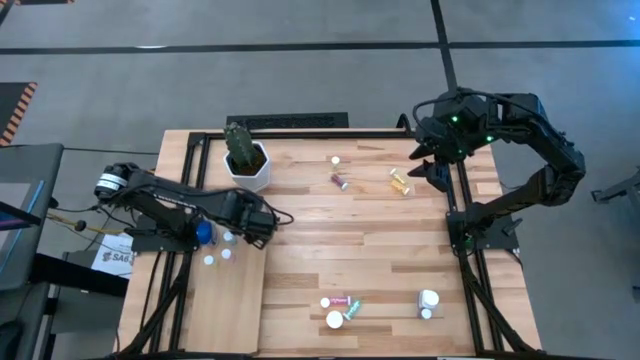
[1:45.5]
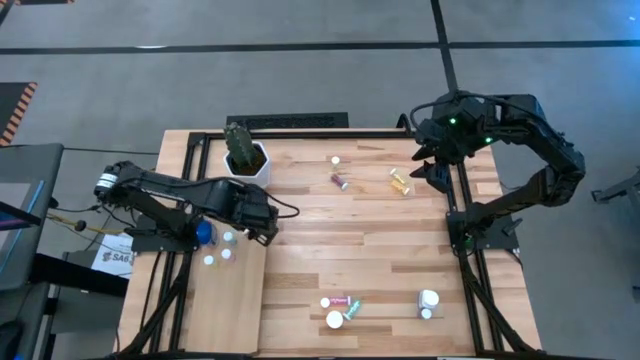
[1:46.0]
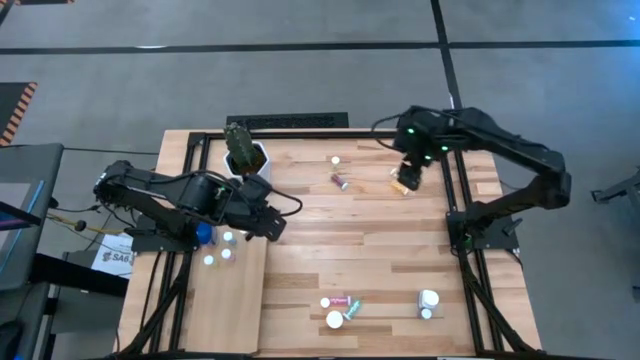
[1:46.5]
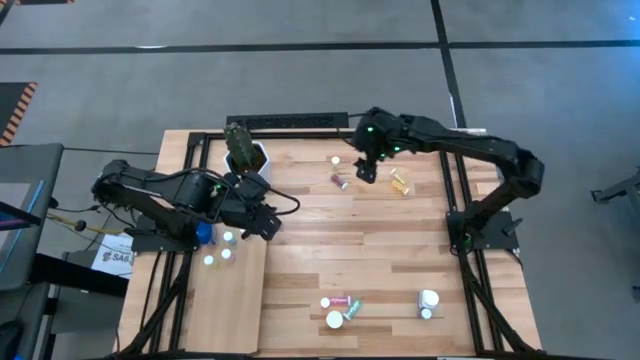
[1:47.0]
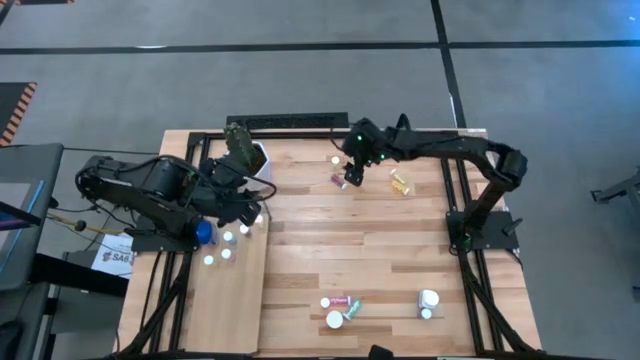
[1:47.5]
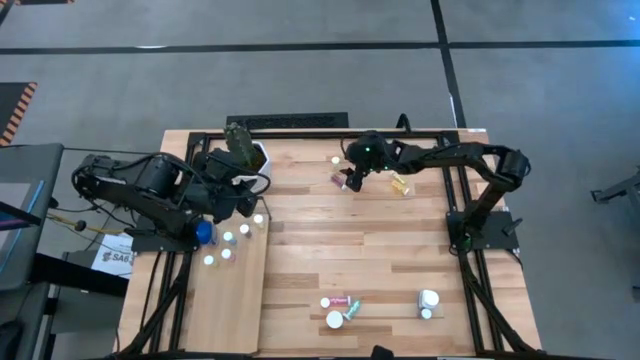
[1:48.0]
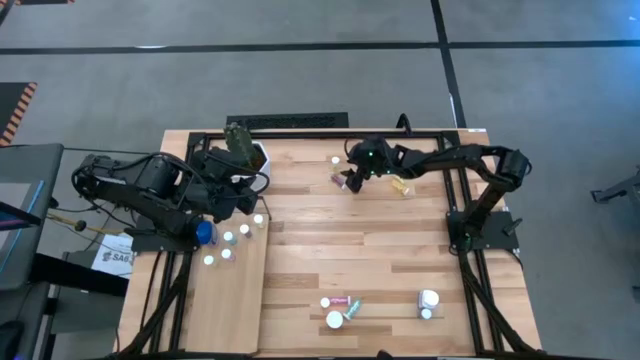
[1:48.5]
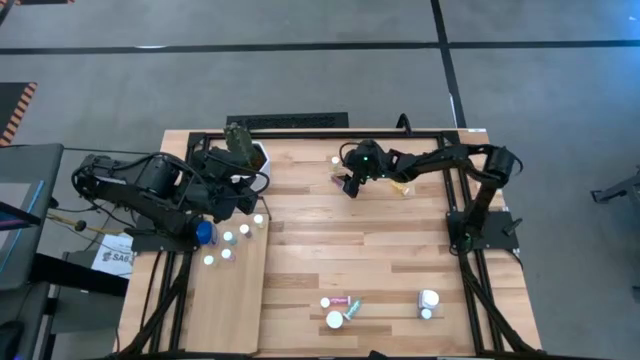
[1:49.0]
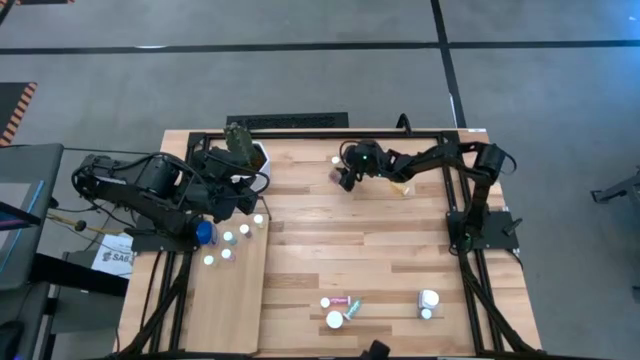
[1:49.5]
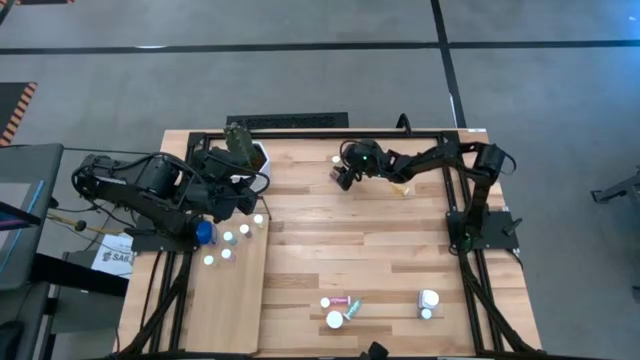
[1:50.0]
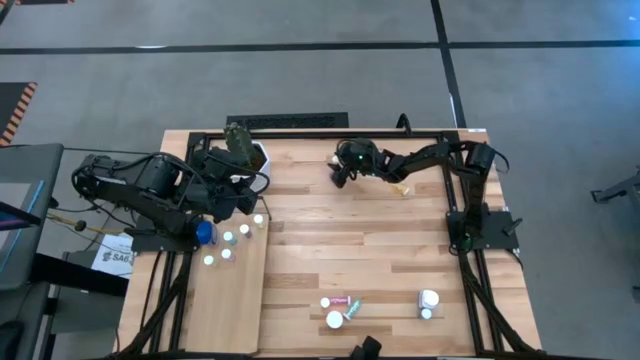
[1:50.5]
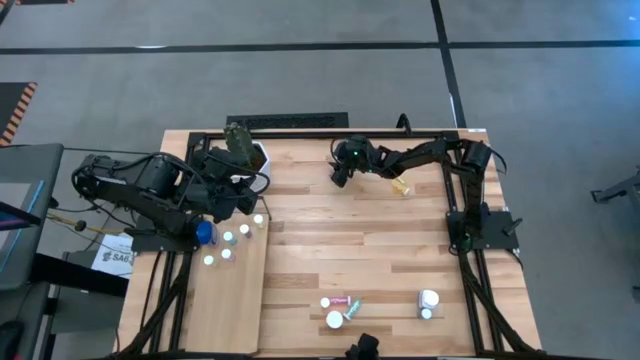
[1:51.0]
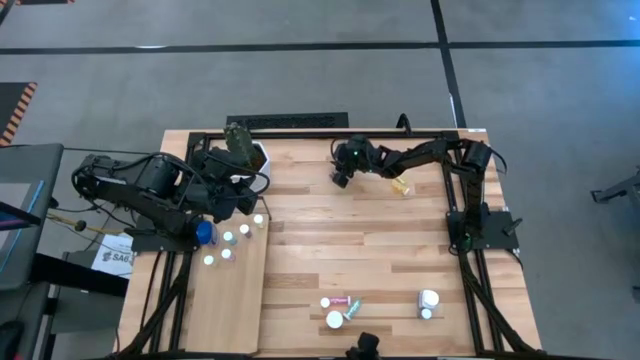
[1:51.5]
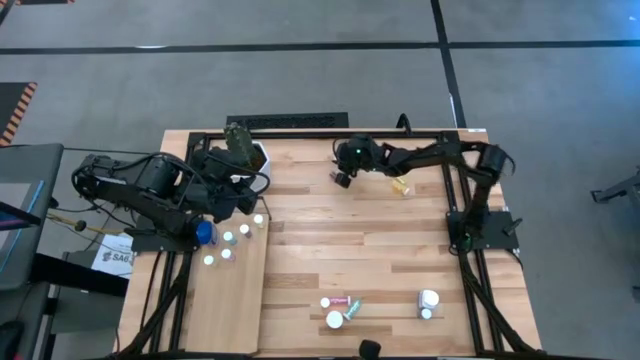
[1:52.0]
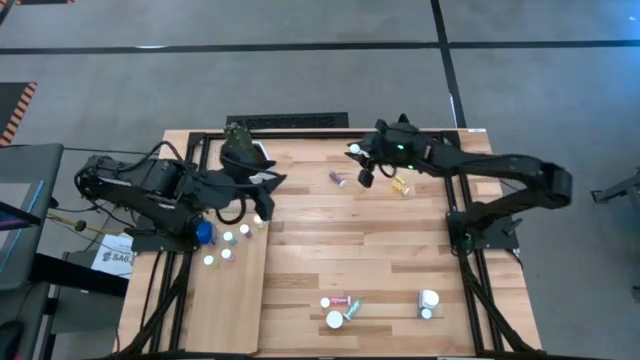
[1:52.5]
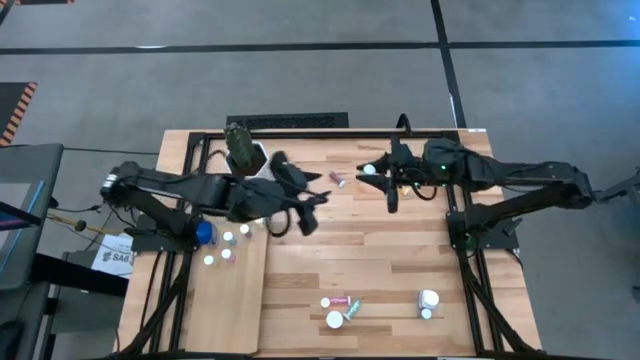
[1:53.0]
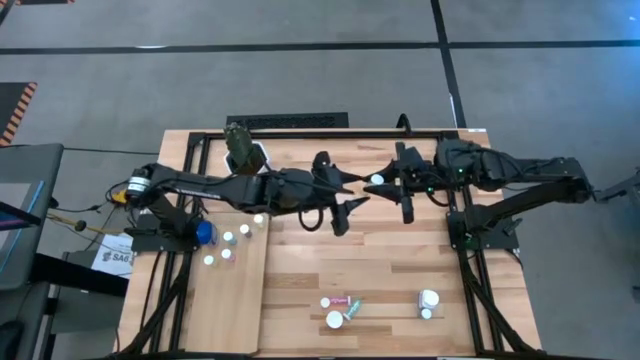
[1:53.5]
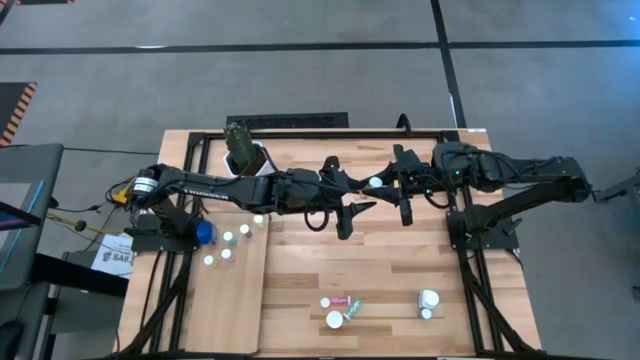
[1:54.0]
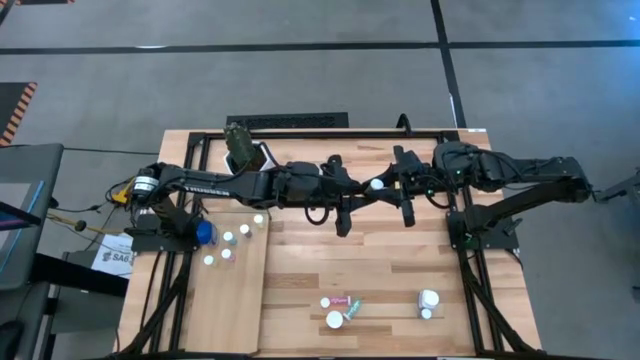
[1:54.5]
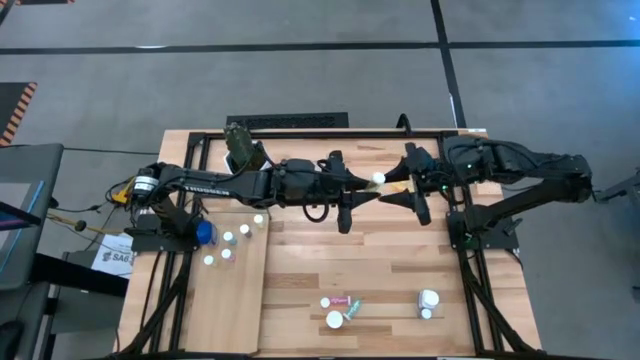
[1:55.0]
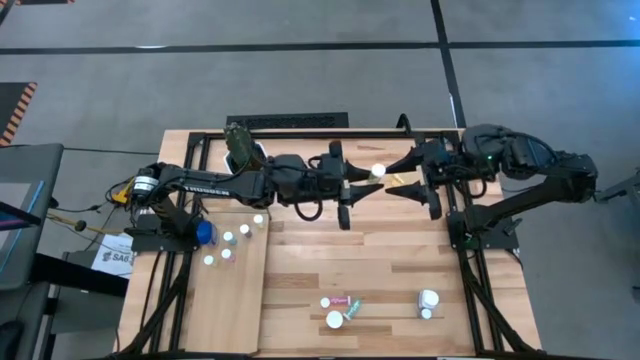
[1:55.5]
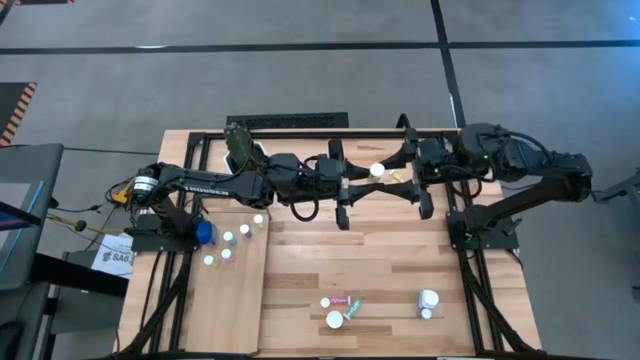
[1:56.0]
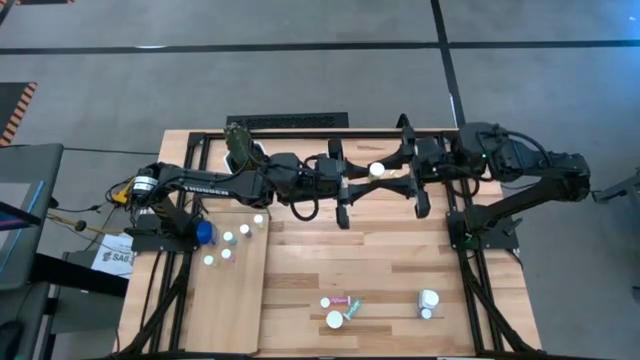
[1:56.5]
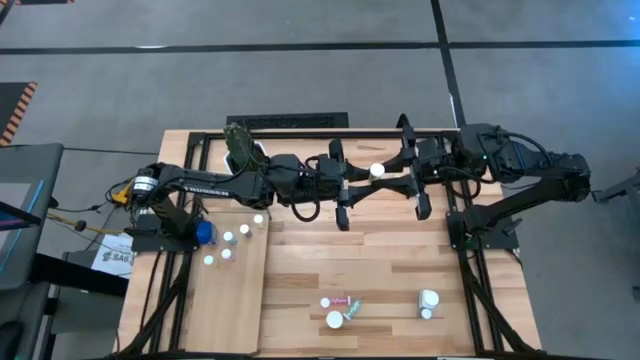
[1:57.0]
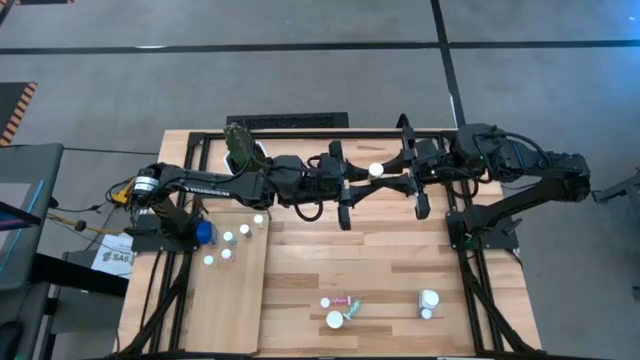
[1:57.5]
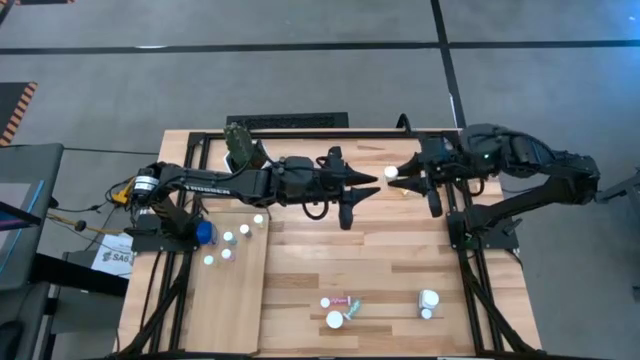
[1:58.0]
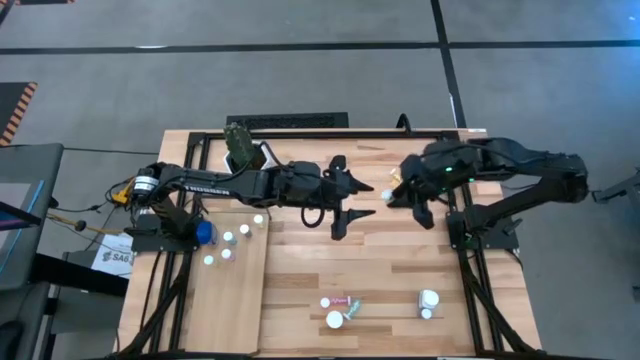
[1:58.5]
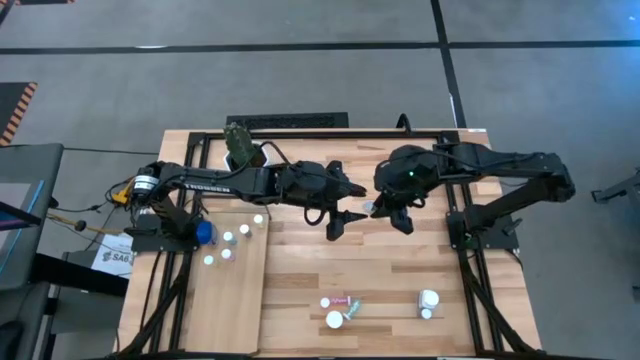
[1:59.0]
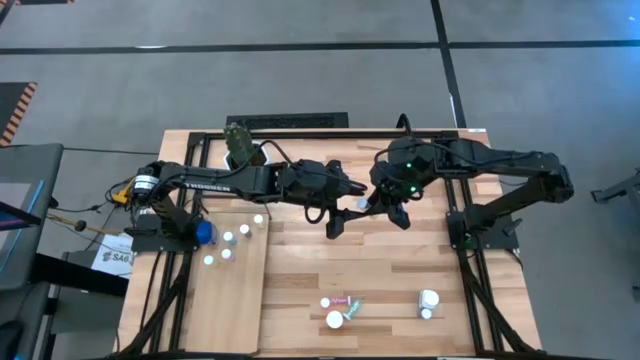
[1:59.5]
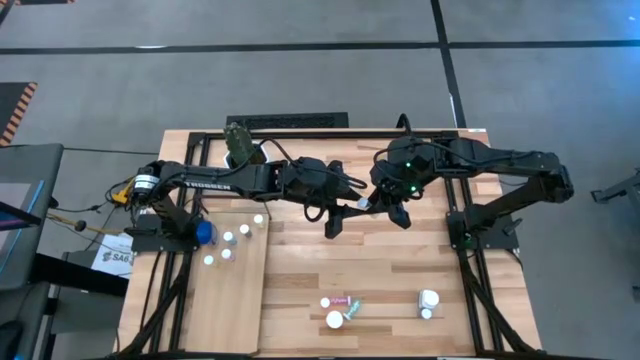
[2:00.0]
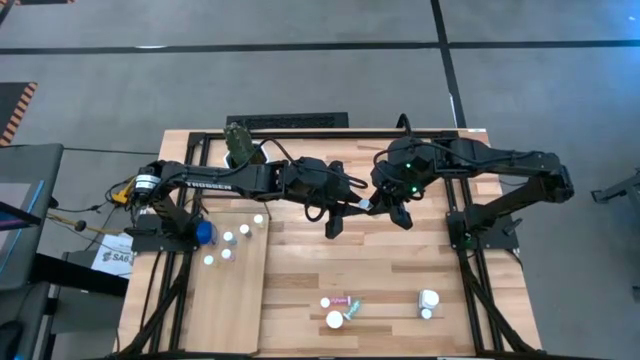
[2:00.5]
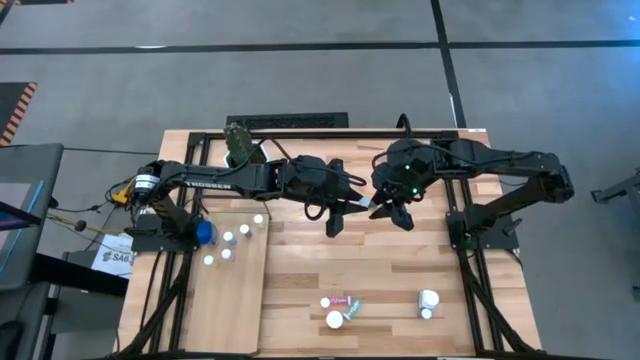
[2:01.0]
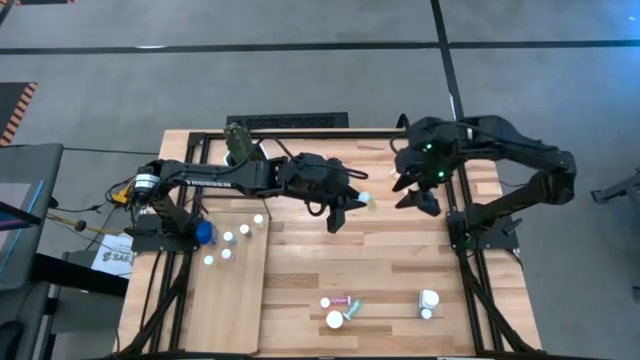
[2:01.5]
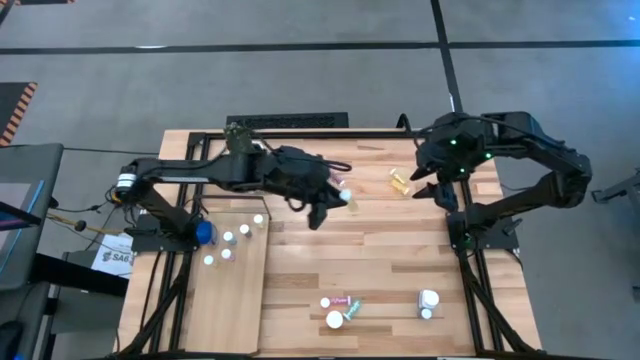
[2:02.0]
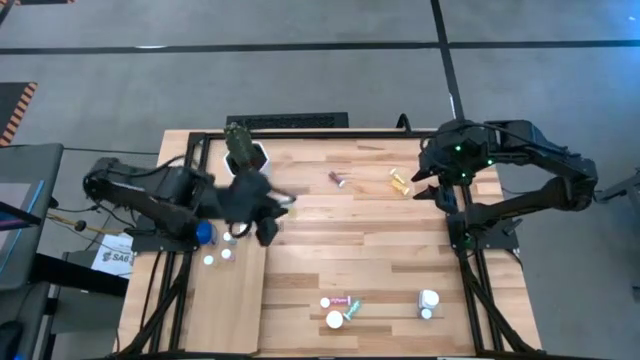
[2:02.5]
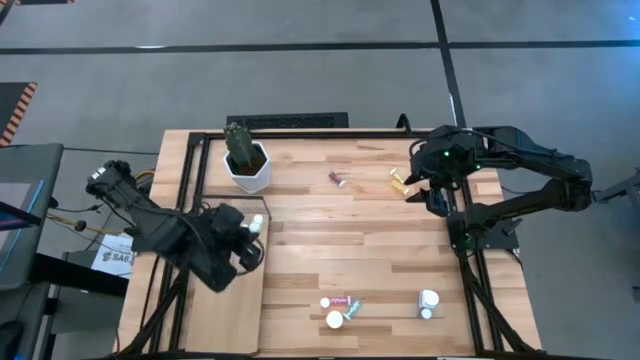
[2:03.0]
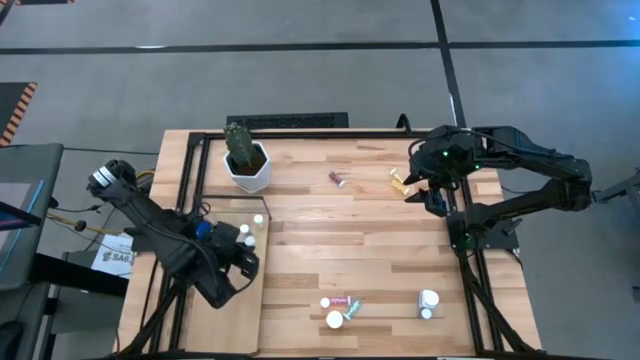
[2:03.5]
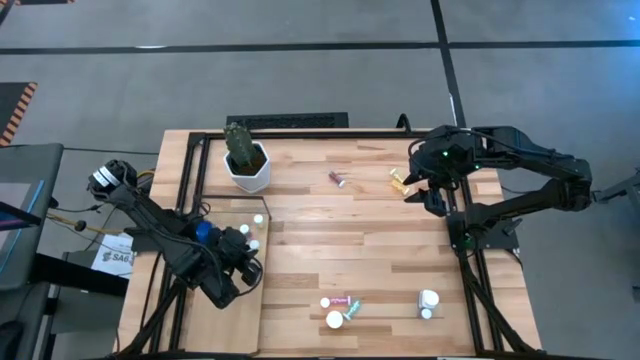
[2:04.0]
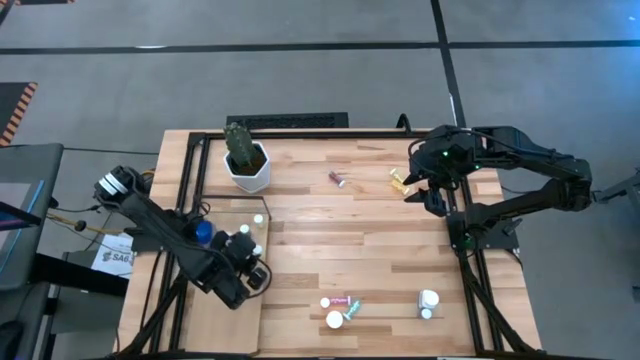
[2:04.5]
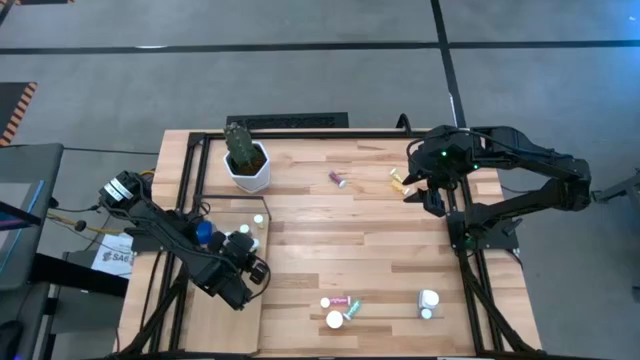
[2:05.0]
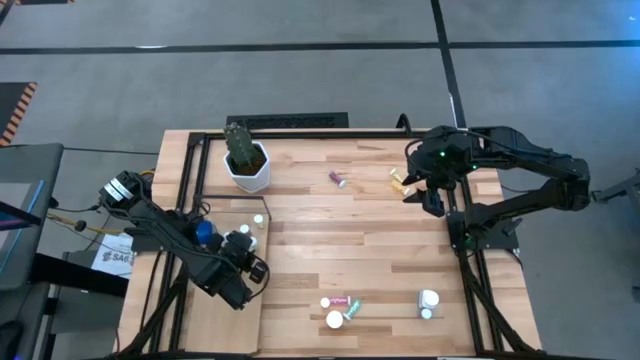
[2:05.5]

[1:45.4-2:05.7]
Task: Pick and place medicine bottles onto shelf by color
Put the yellow pill bottle on the shelf
